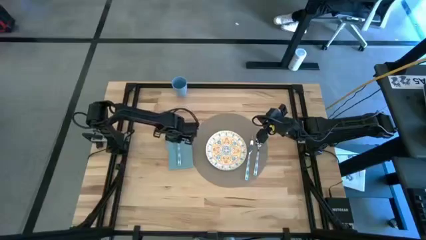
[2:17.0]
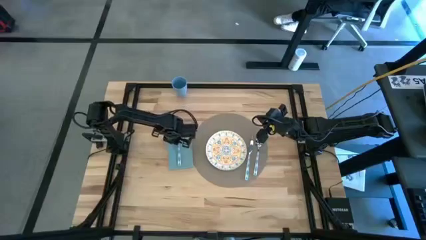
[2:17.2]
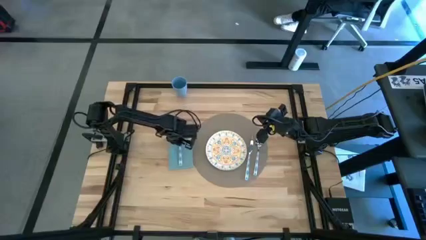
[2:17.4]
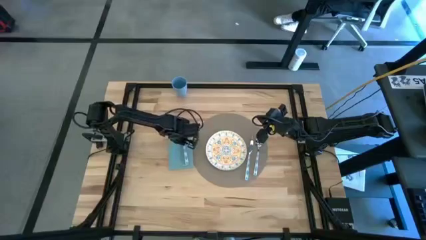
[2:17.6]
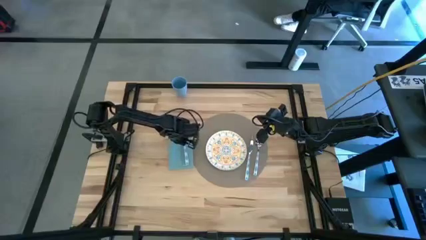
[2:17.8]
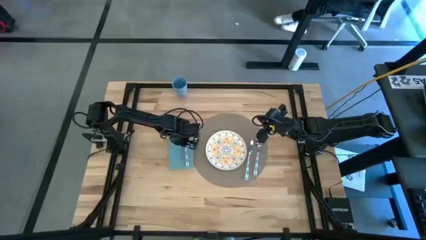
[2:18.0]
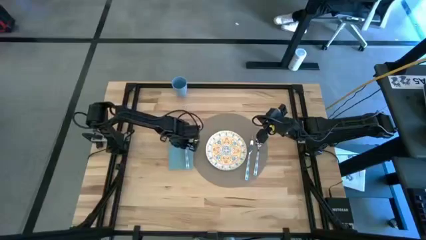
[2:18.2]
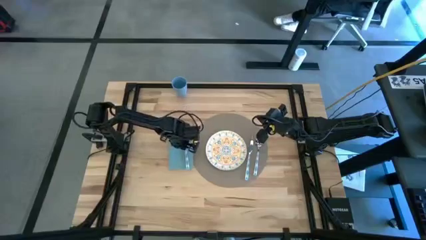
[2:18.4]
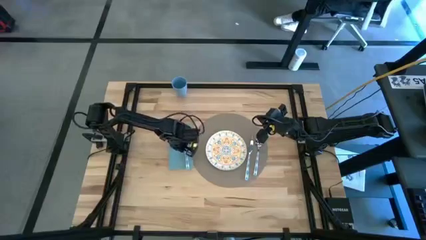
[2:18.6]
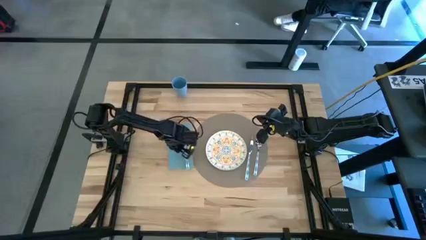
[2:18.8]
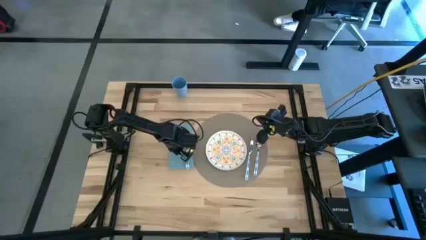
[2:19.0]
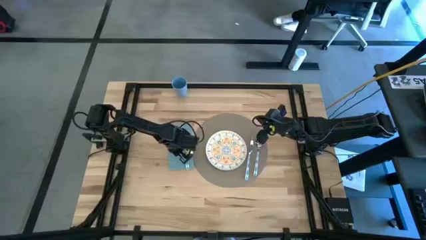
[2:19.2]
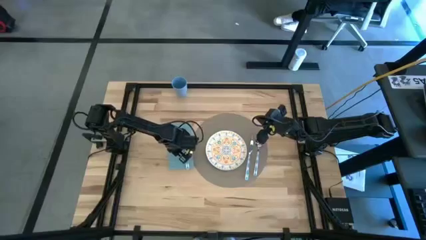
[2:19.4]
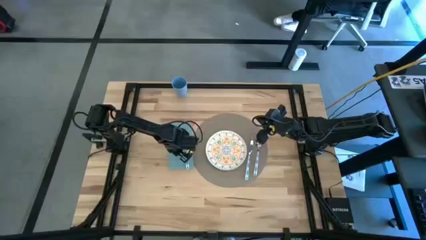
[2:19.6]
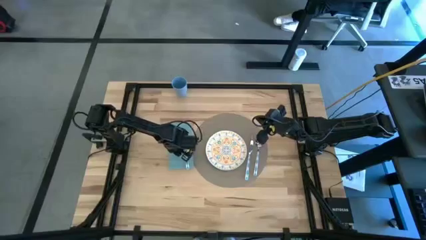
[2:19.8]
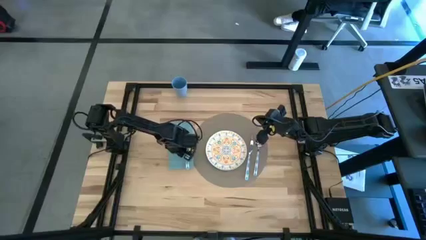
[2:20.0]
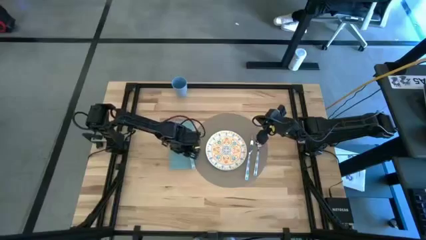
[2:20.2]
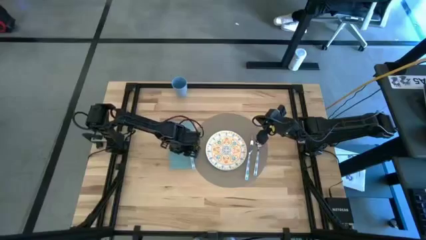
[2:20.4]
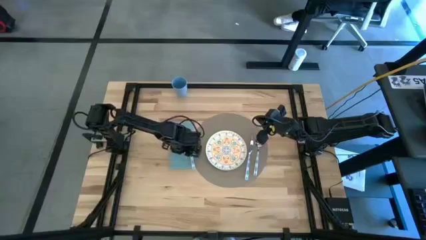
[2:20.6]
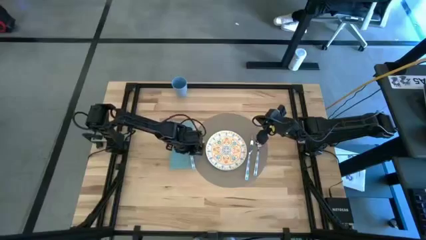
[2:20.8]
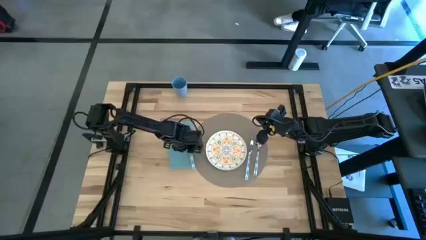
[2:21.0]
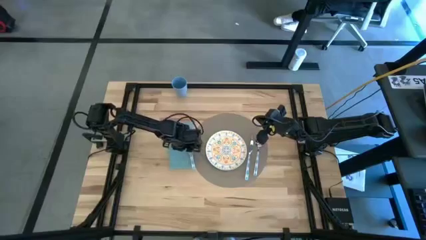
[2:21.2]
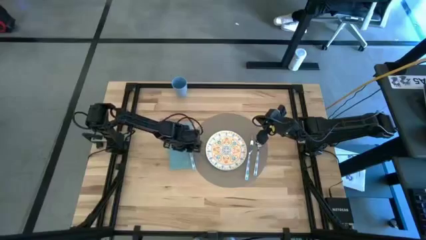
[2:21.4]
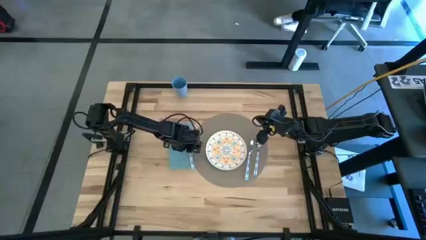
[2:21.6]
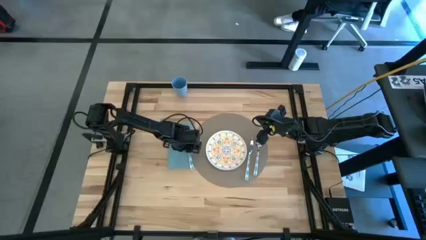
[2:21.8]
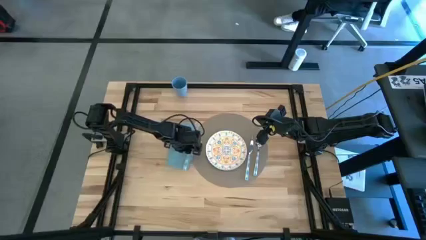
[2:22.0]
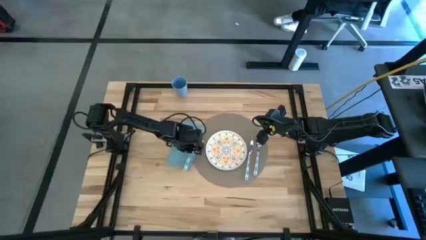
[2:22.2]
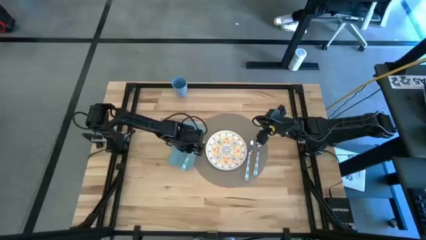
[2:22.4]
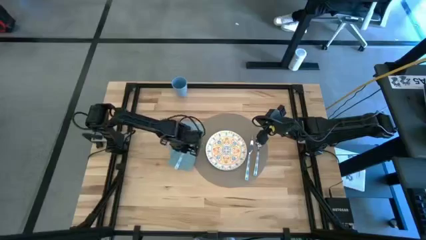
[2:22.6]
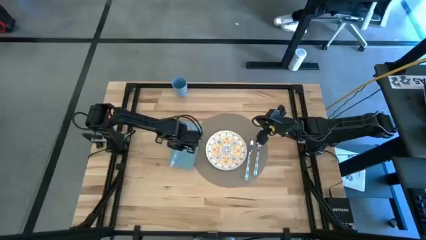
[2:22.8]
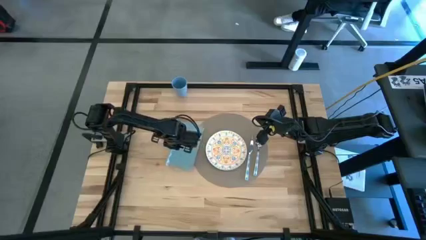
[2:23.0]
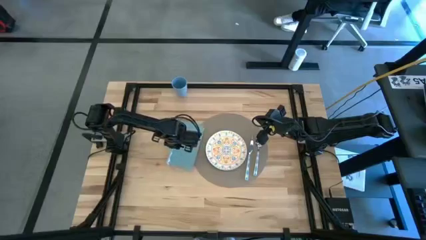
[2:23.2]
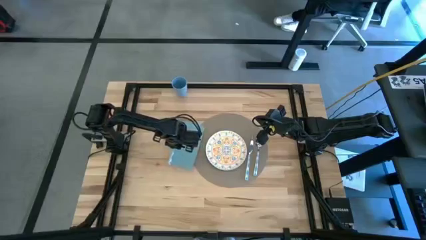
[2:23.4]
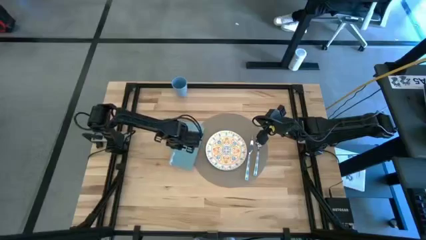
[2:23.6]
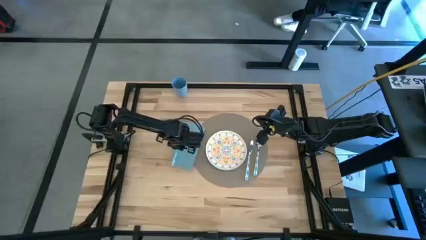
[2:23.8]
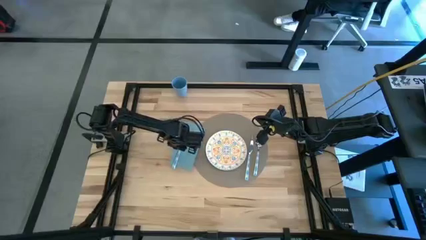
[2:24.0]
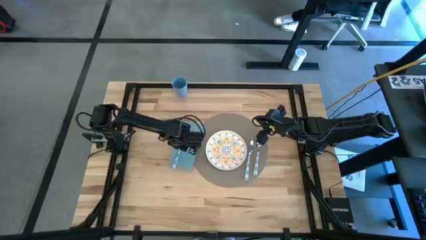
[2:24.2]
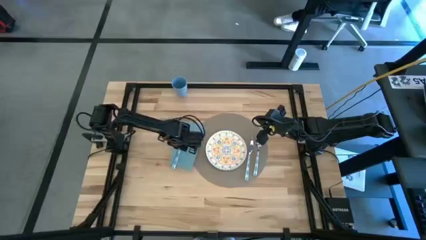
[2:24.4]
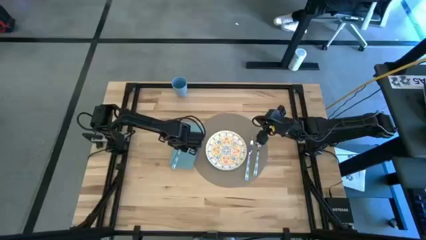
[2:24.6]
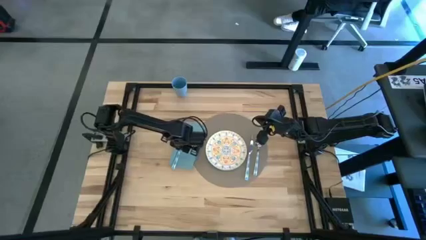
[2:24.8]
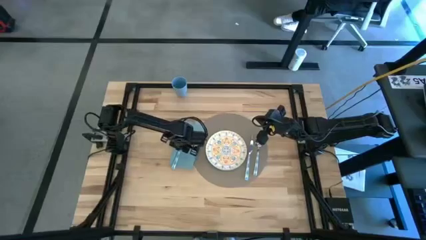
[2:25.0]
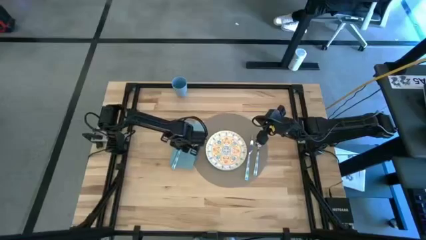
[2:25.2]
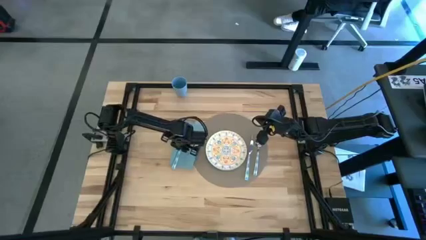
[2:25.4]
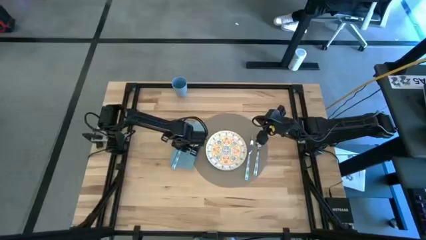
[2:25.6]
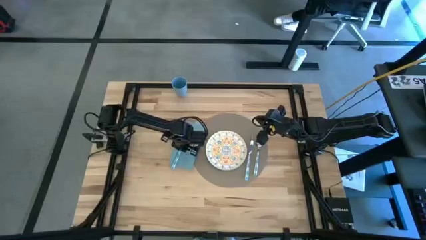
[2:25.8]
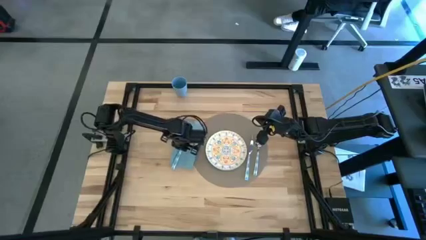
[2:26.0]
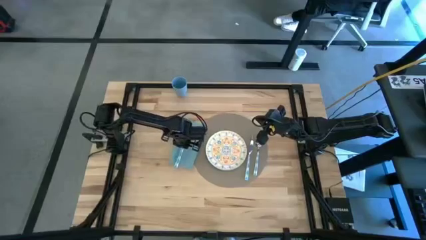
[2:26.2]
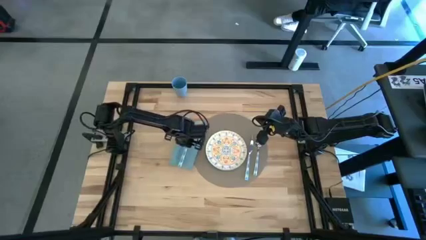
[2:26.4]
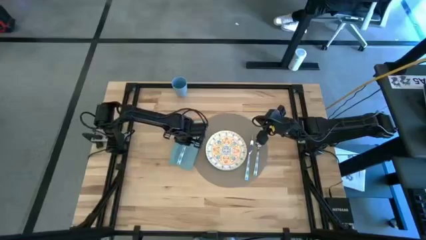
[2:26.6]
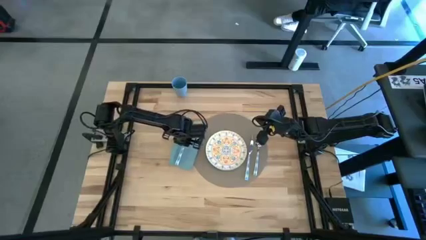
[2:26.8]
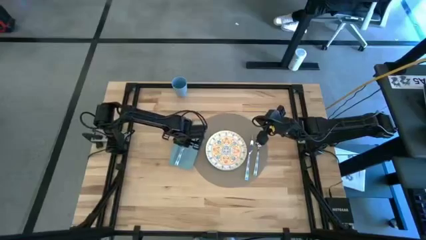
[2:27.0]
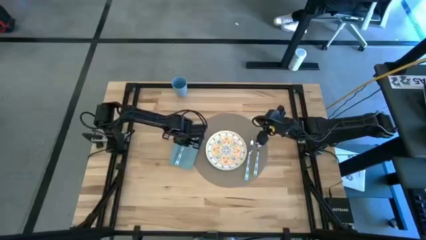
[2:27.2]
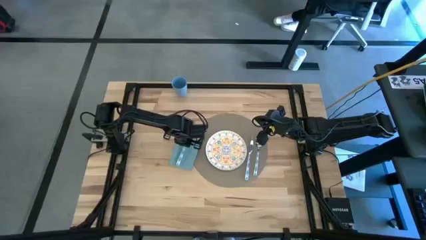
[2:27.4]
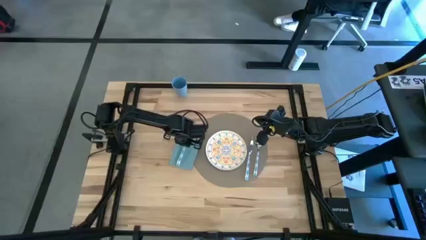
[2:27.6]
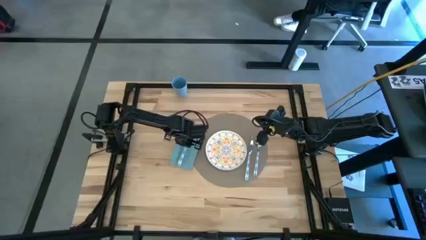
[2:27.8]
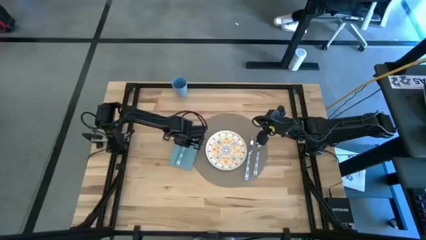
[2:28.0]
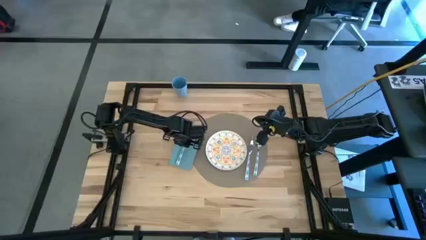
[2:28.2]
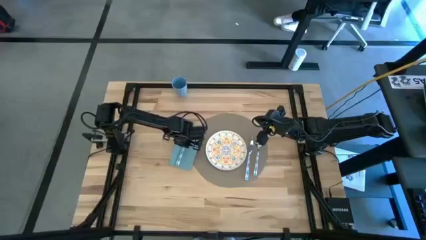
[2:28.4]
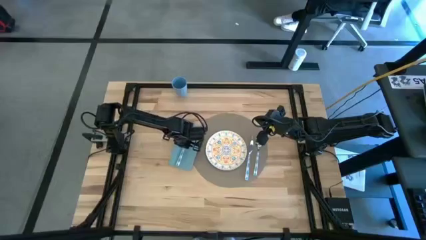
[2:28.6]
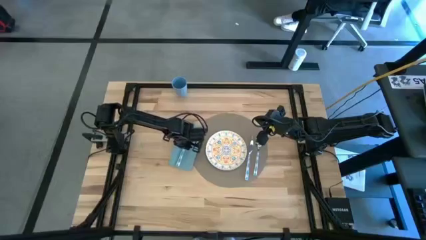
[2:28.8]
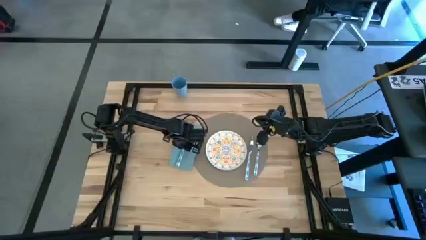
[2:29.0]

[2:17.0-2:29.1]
Task: Set table place
Put the blue fork on the blue napkin

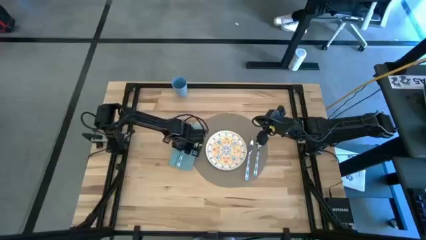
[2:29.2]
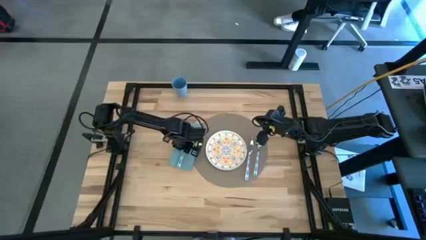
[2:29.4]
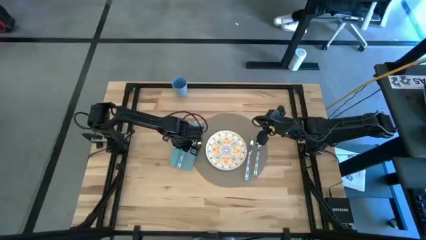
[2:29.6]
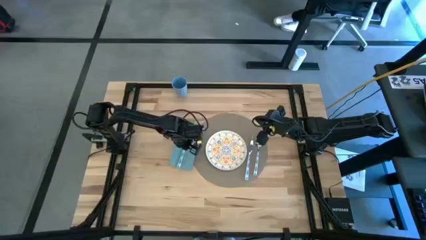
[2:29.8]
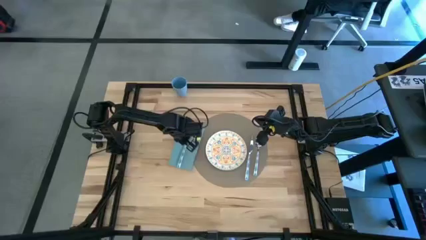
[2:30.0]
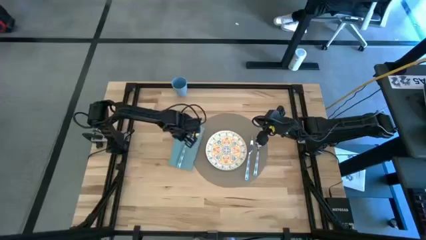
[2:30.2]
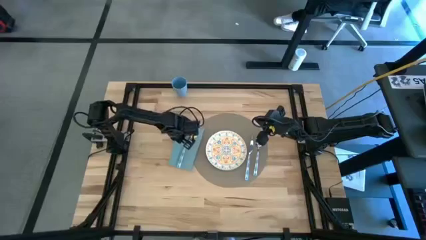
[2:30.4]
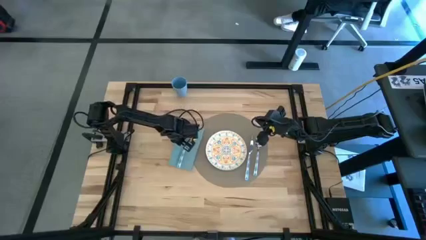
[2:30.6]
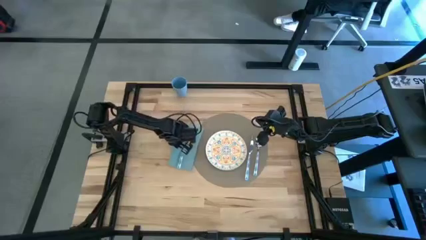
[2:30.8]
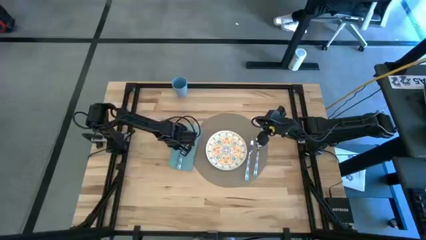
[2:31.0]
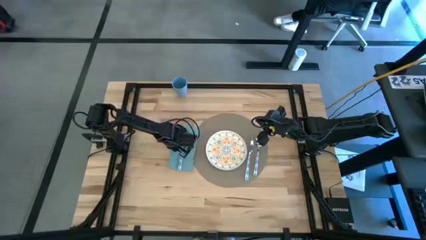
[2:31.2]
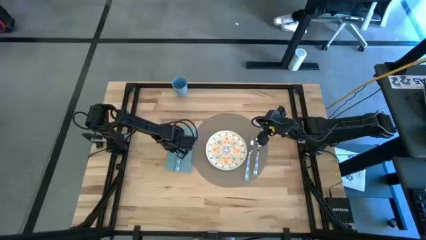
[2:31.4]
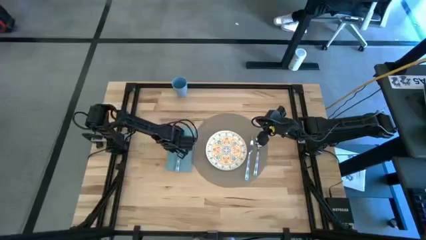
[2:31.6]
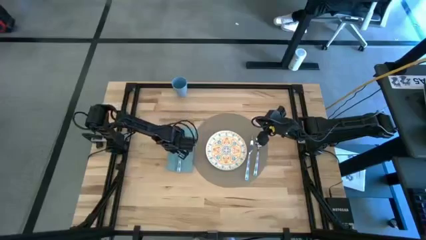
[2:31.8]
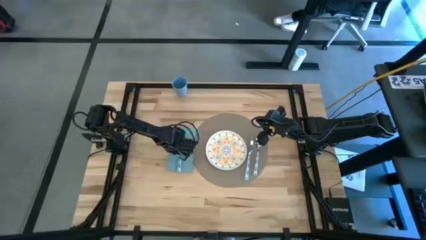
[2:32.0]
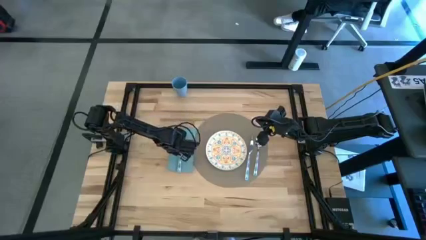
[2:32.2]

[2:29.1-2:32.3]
Adjust the blue napkin

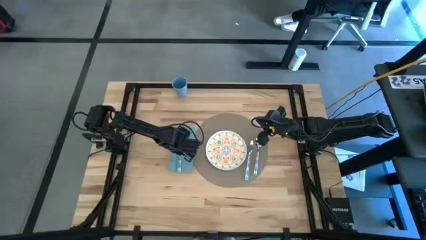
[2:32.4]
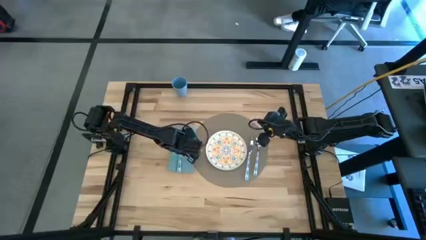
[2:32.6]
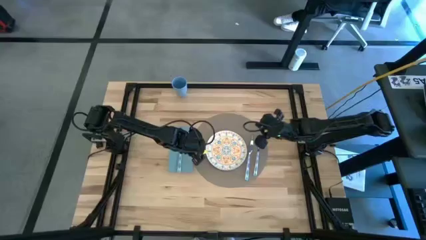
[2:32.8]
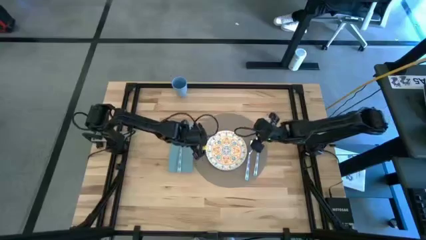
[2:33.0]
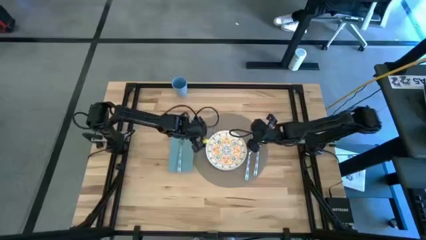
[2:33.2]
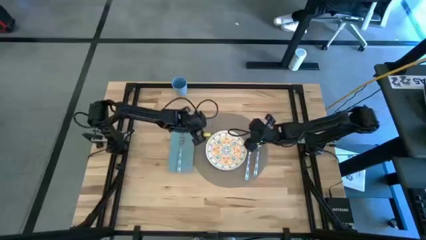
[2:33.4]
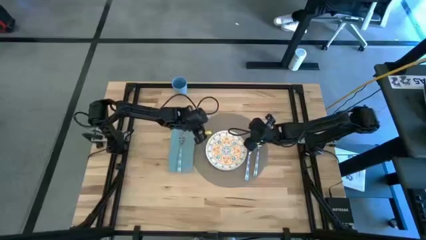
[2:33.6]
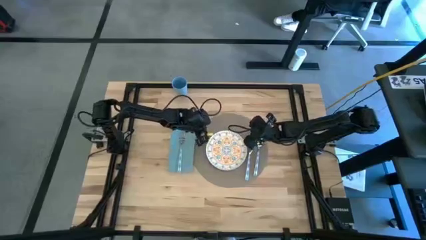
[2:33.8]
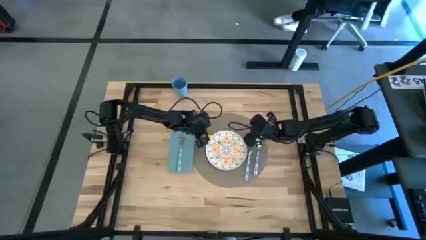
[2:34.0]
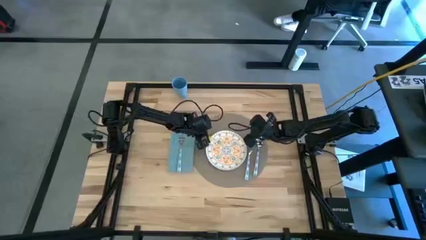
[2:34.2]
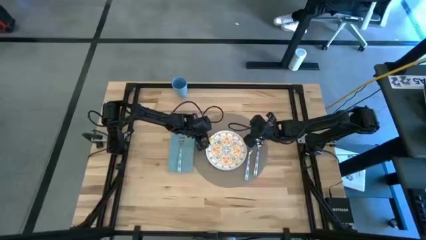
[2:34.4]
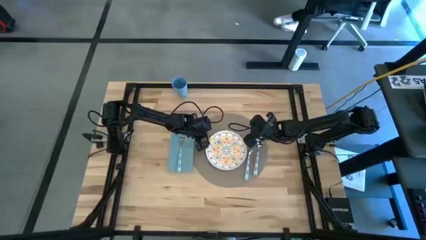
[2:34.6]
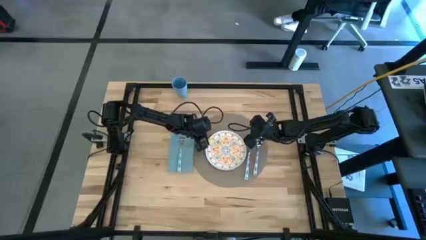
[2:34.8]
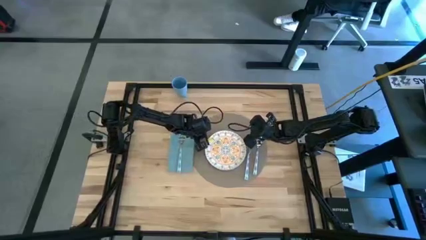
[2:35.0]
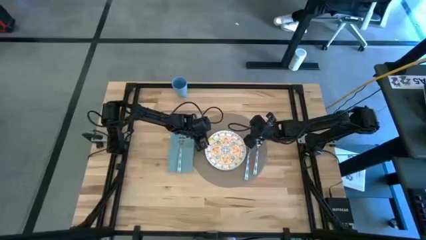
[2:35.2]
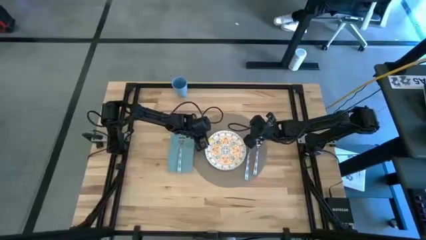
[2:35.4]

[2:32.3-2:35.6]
Adjust the brown mat
